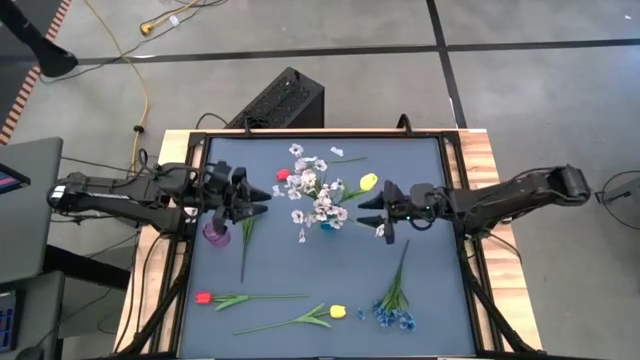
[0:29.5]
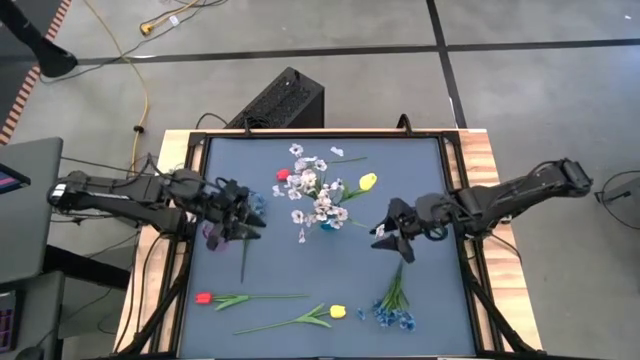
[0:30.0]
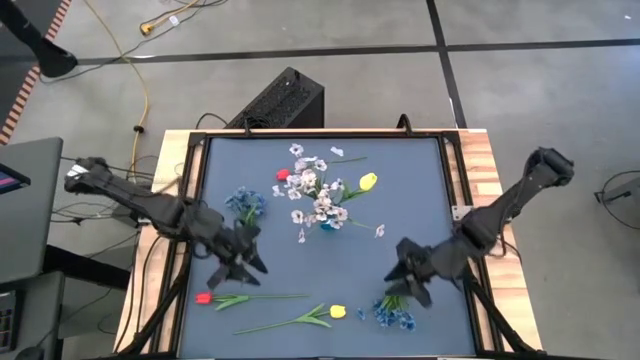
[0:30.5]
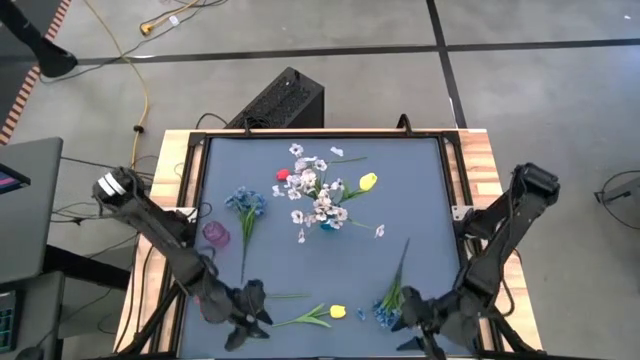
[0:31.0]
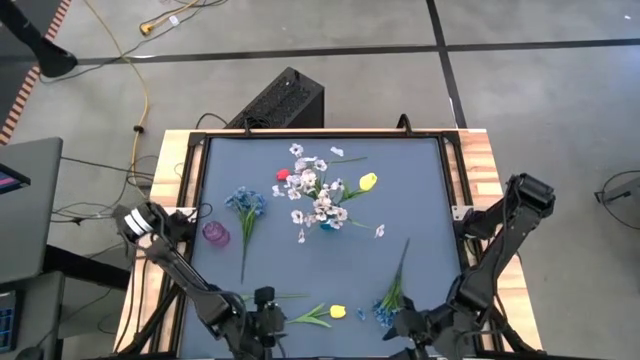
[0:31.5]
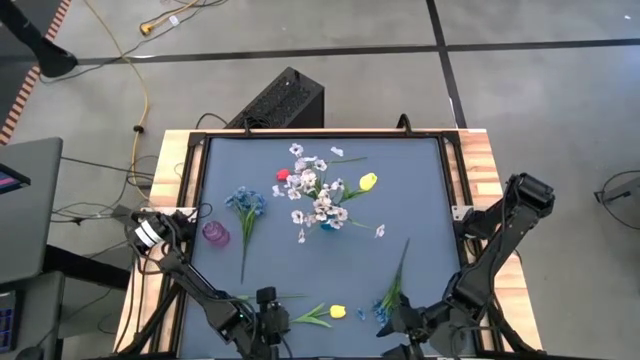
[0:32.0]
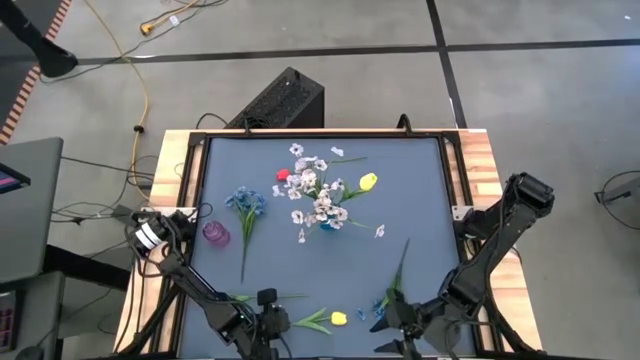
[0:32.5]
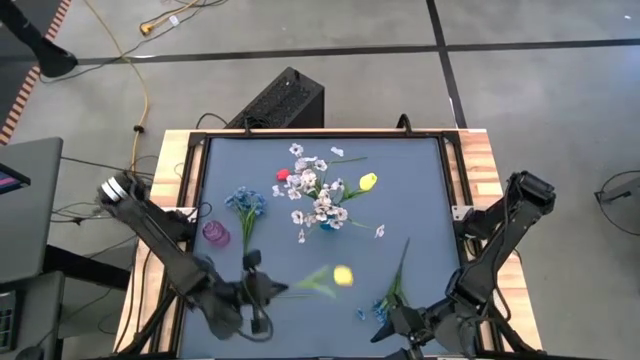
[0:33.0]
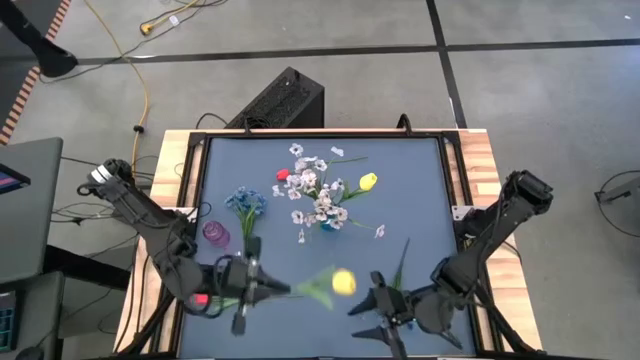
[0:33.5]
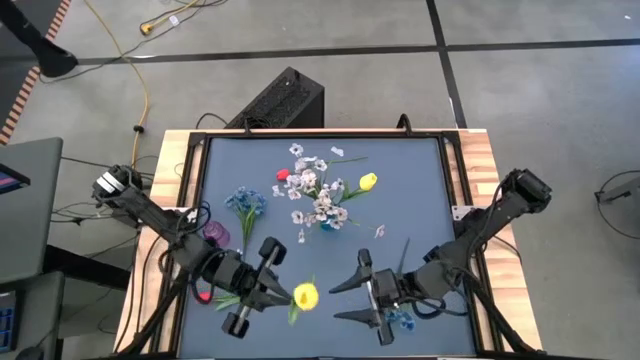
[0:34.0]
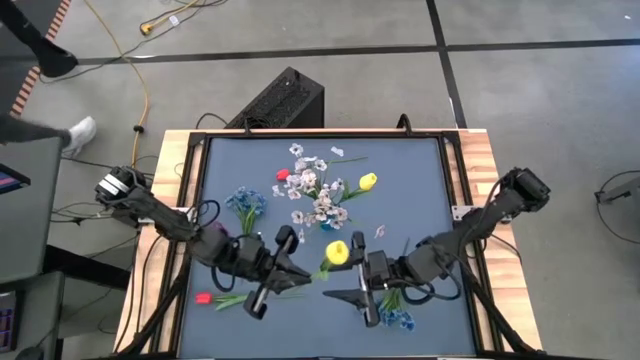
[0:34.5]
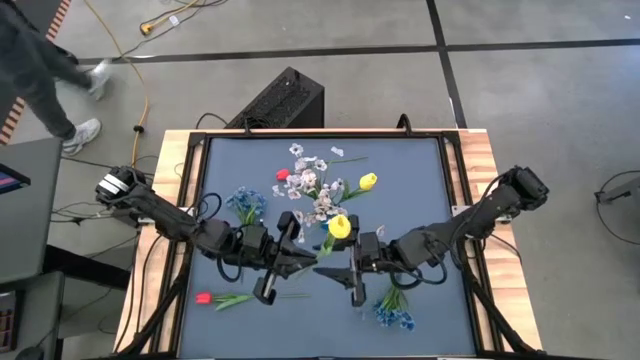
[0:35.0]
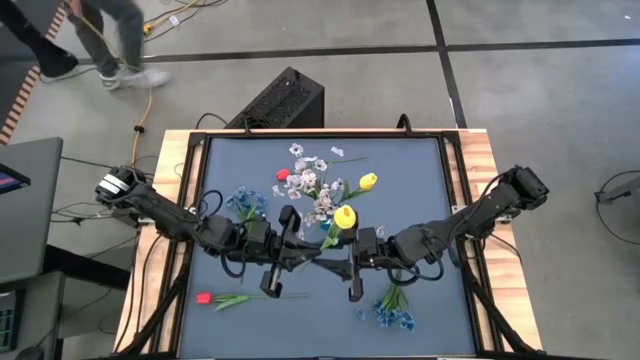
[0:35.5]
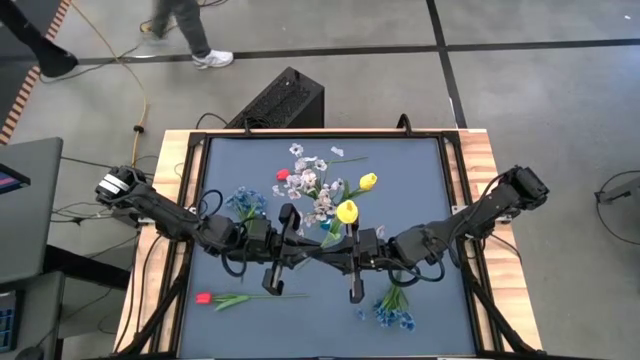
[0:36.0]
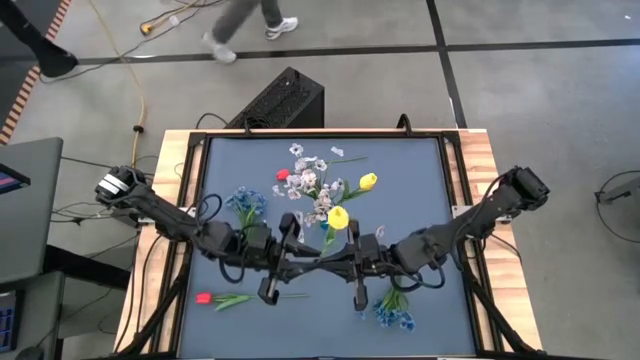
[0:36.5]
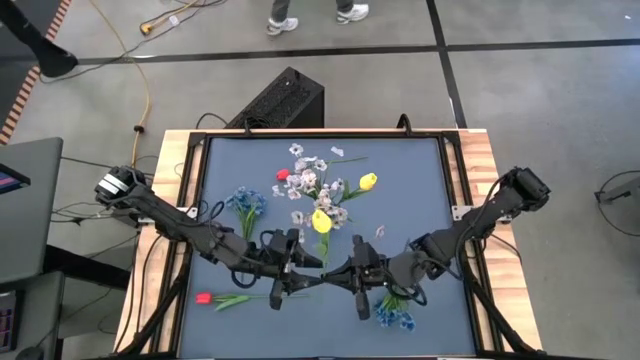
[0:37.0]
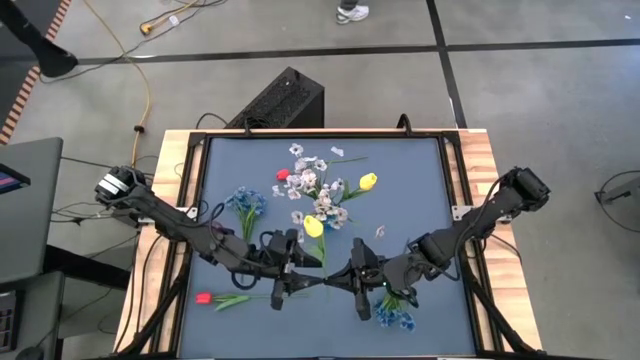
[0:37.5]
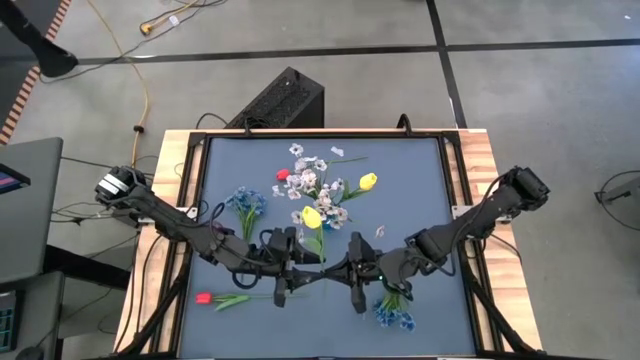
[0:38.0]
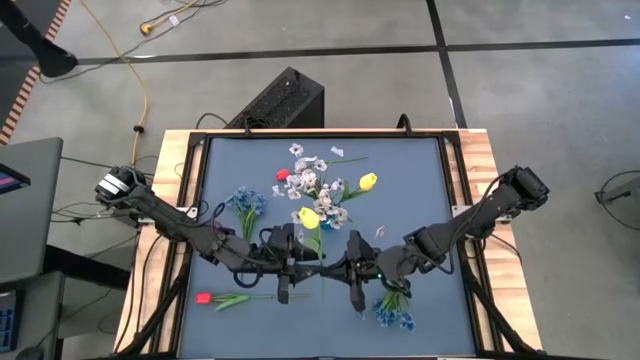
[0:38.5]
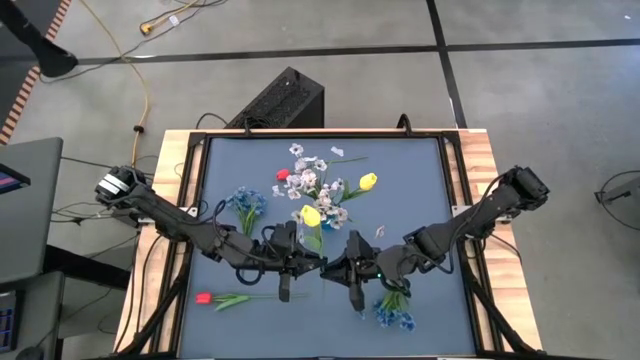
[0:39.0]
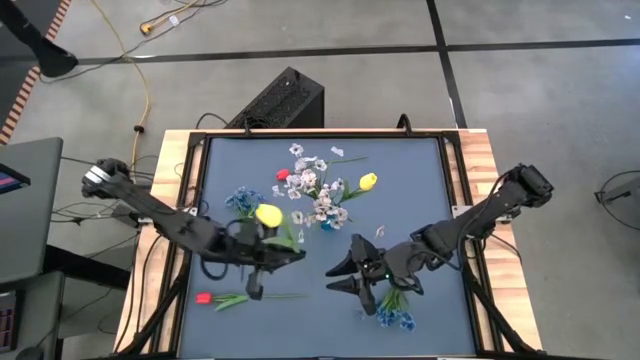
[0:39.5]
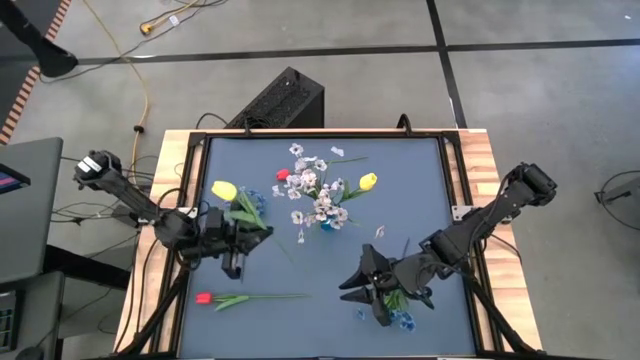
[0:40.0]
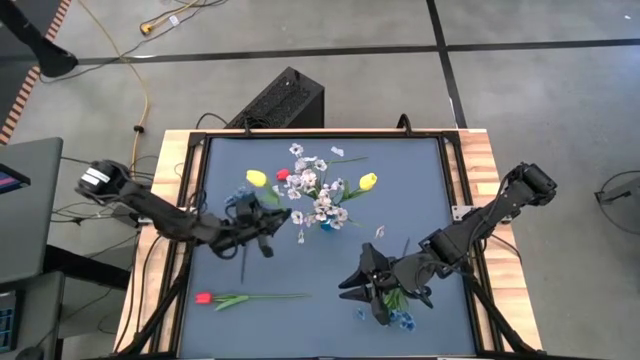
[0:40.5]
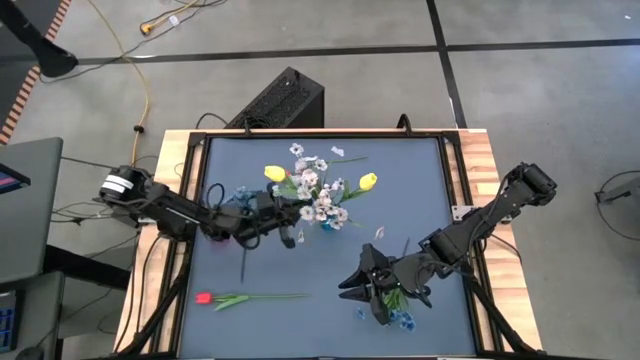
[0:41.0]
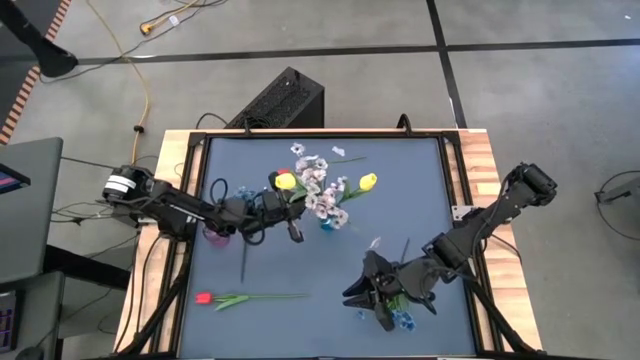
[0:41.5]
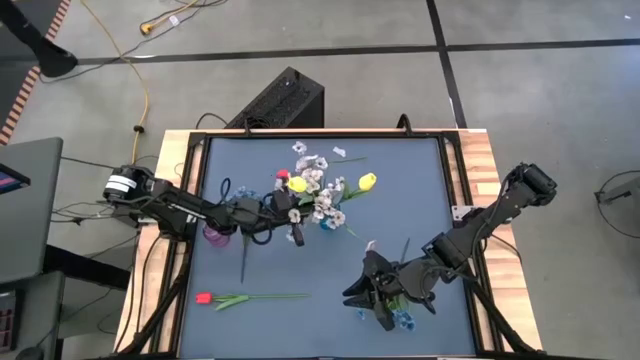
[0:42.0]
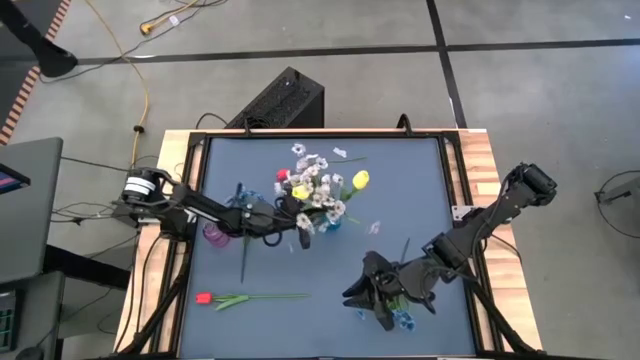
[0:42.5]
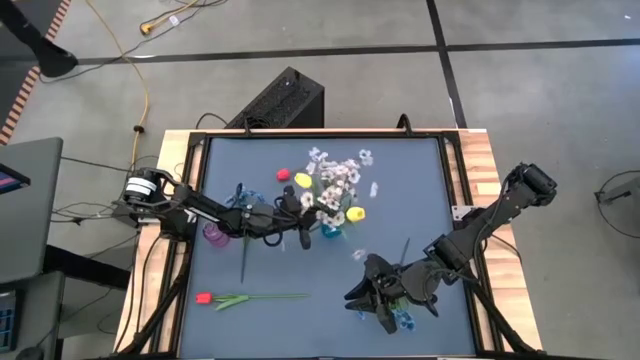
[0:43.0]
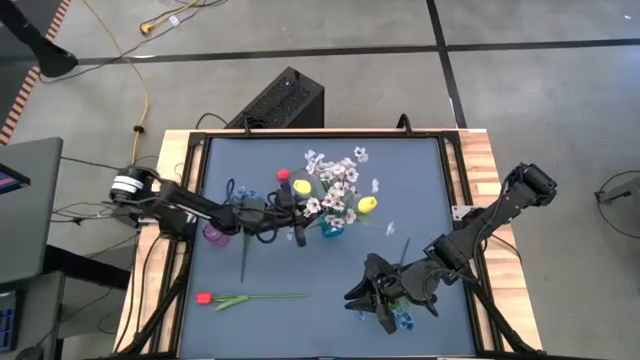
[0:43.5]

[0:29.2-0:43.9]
Task: Sort flowers into vase by color
Put the yellow tulip into the blue vase
